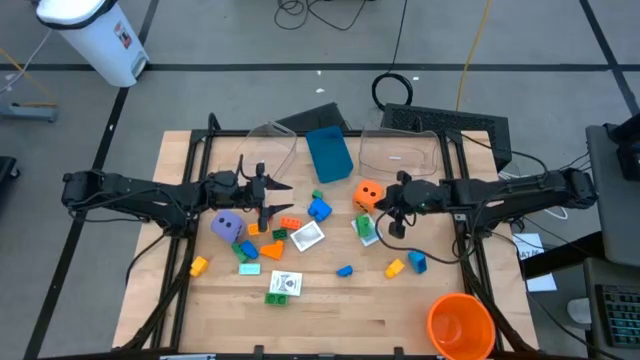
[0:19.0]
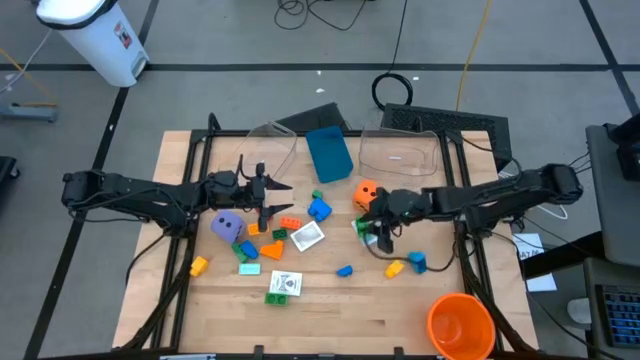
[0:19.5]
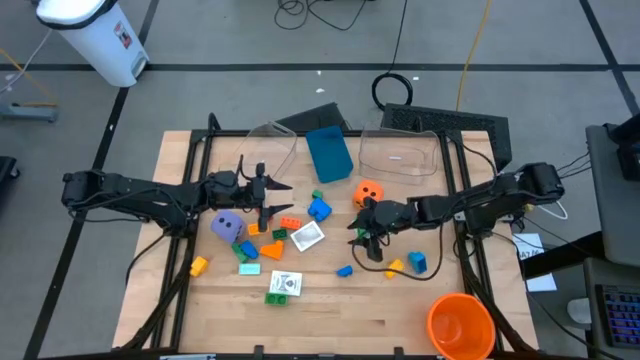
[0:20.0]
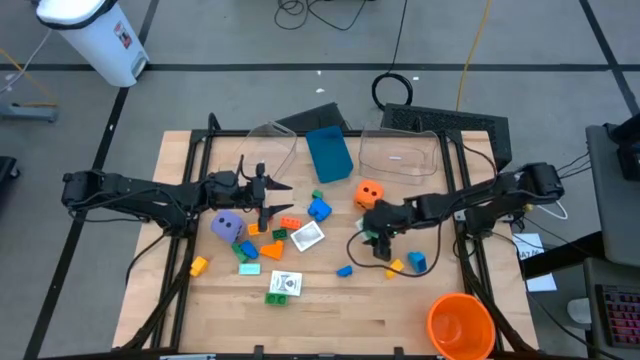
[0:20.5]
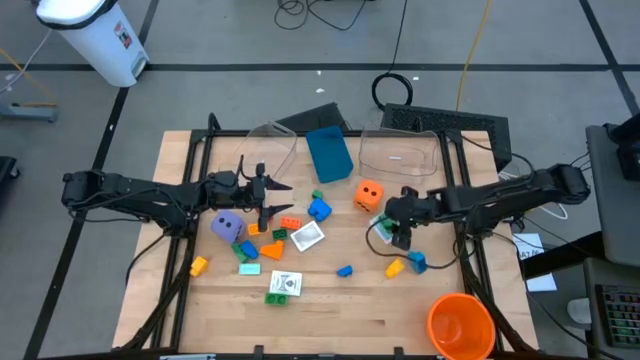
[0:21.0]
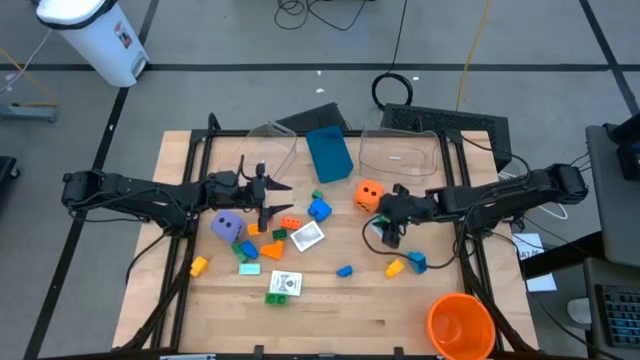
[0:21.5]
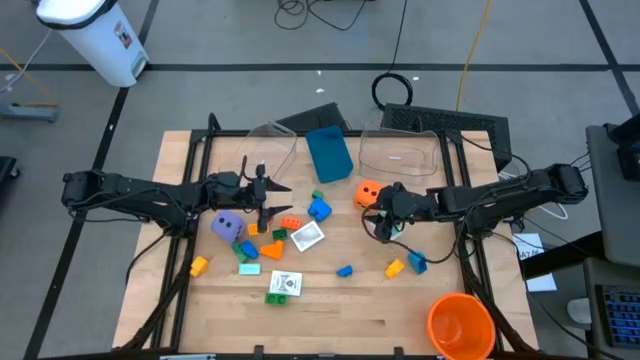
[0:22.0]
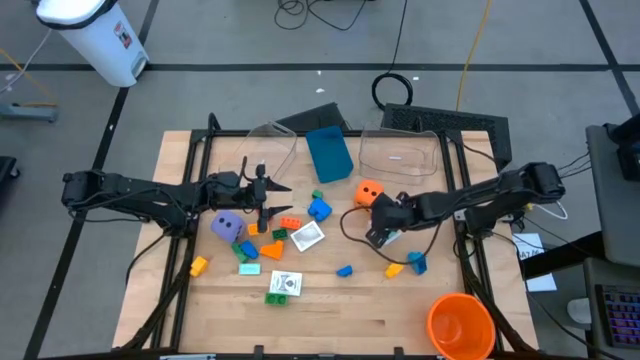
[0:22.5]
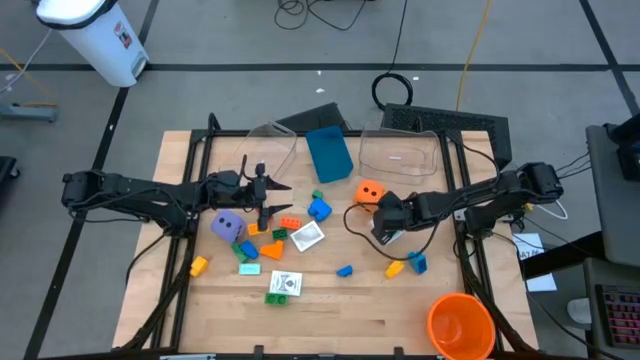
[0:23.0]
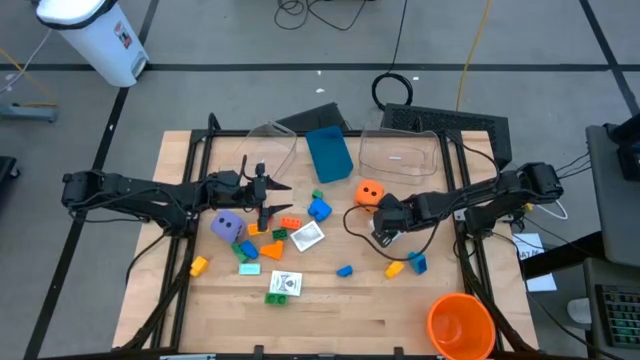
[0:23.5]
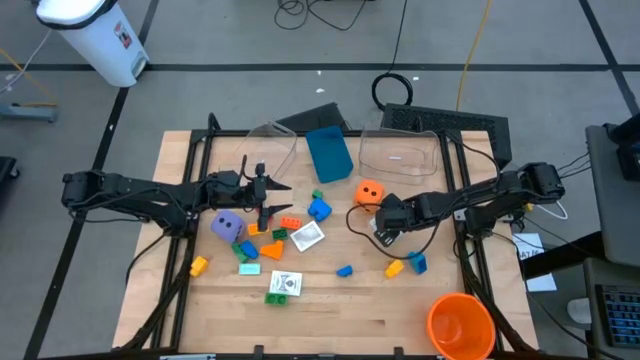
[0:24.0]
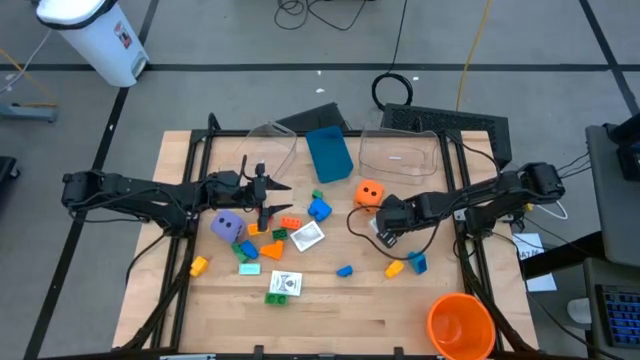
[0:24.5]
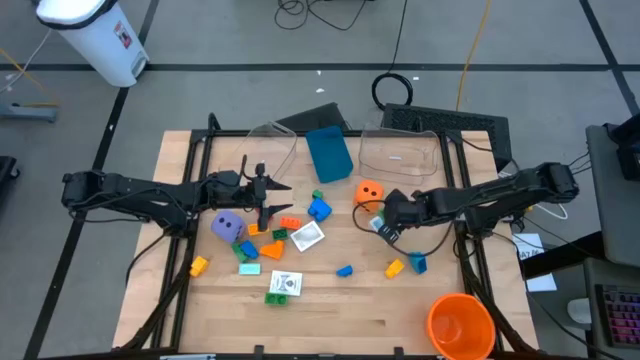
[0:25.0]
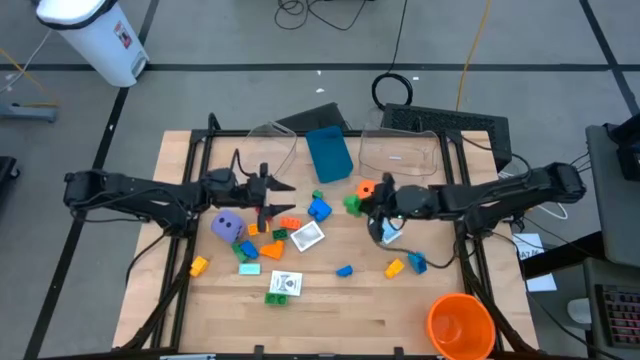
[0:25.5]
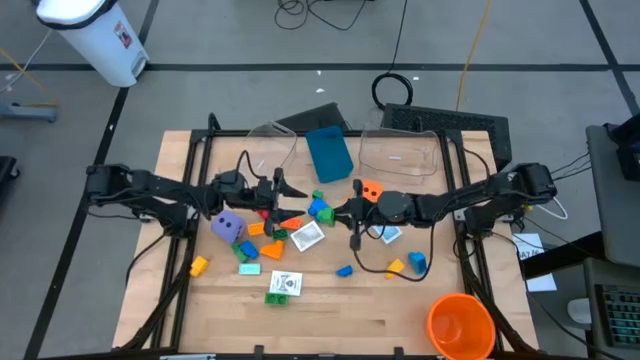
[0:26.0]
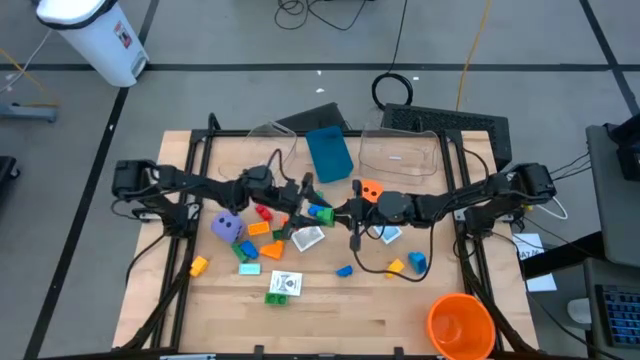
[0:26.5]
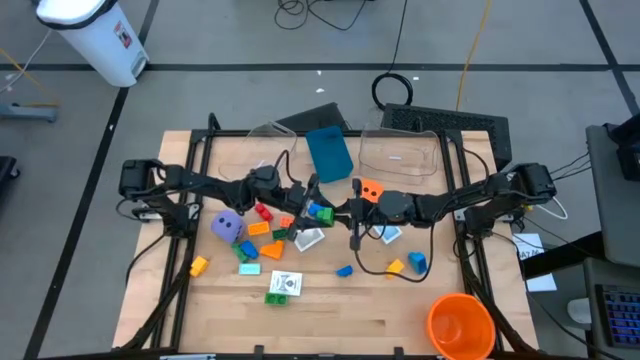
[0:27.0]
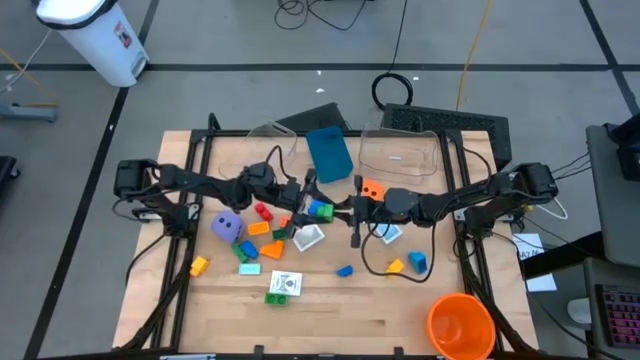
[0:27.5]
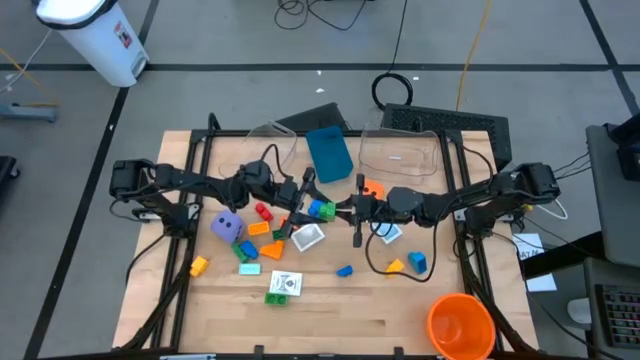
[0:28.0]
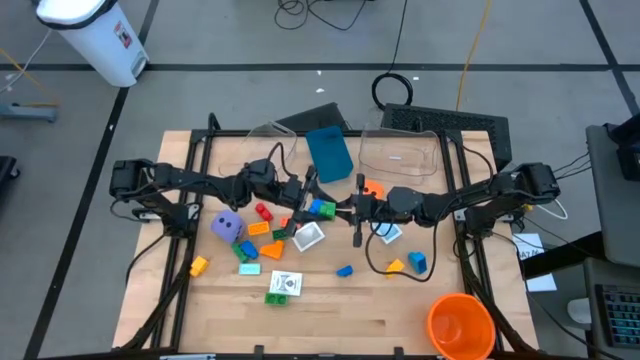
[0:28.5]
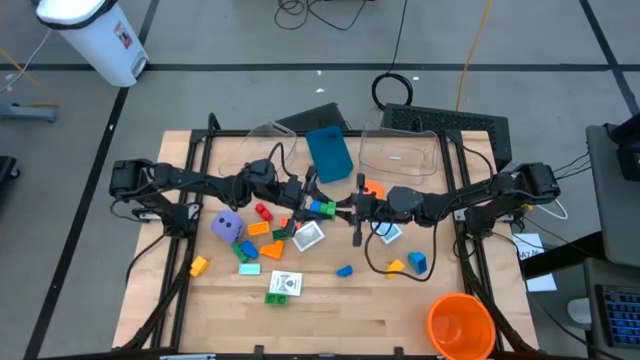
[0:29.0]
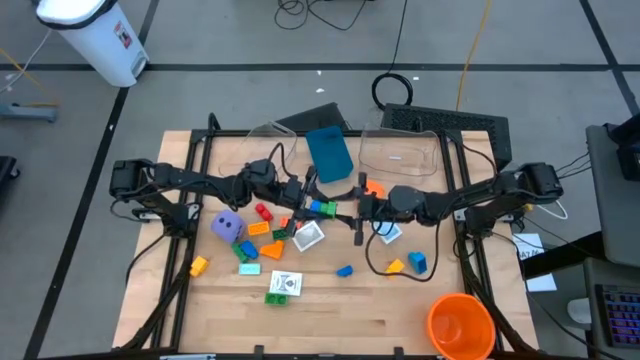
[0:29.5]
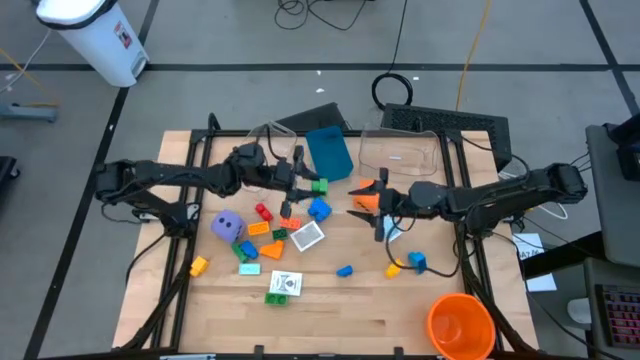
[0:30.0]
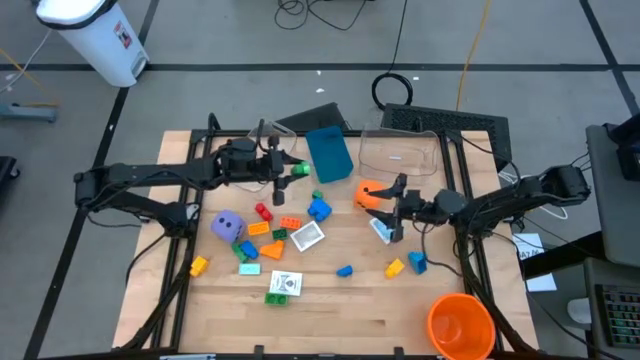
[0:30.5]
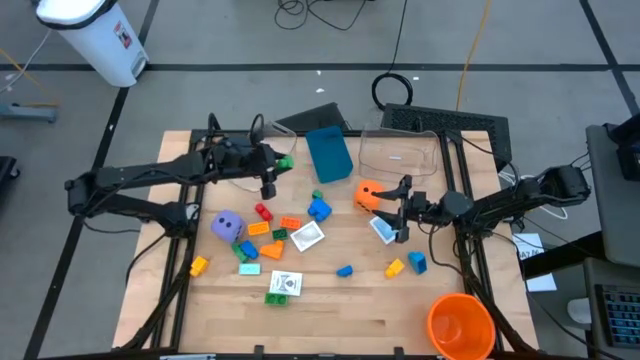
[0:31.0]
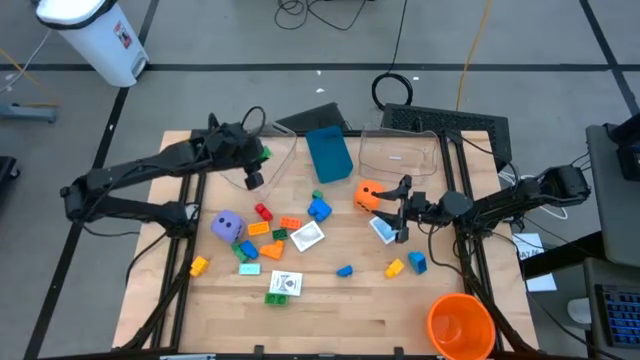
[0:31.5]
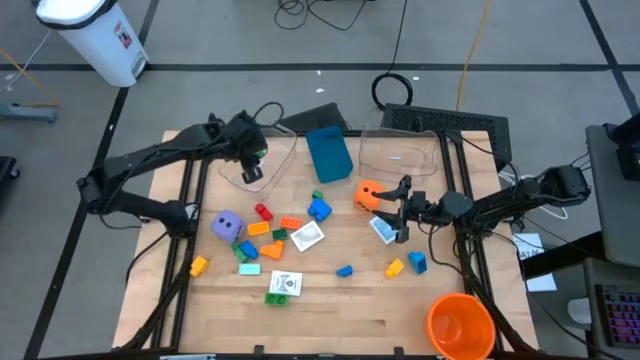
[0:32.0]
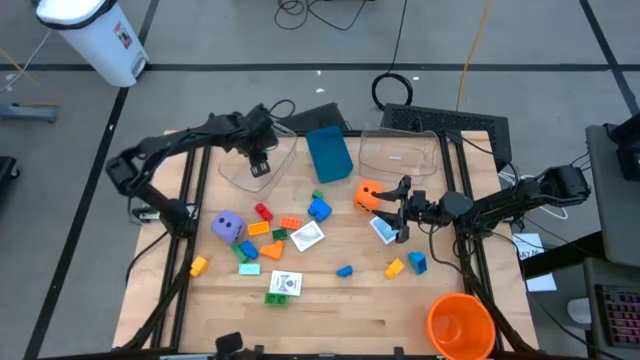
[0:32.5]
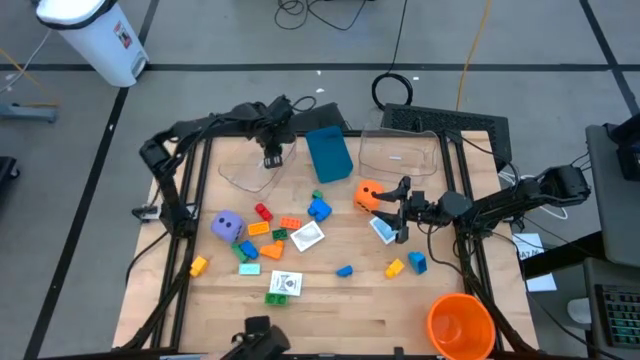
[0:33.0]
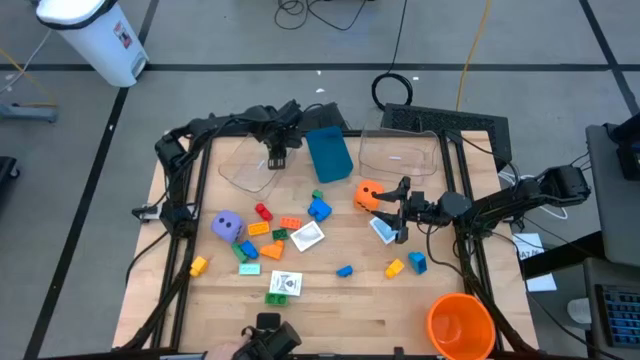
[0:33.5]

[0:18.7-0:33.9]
Task: Pick & Place Toys
Put the green game piece into the left transparent bin

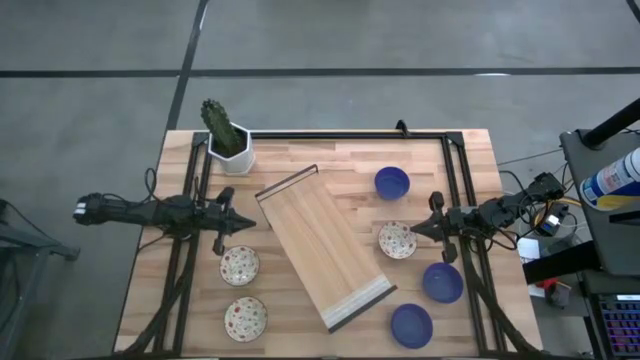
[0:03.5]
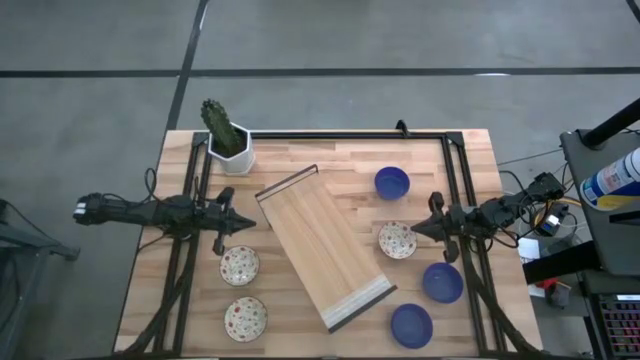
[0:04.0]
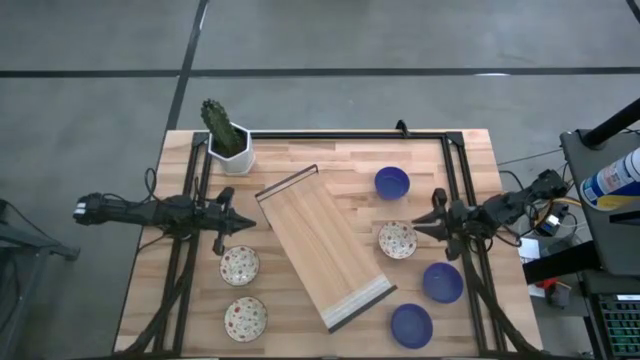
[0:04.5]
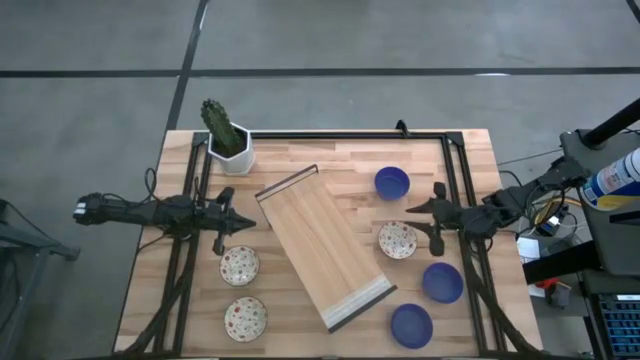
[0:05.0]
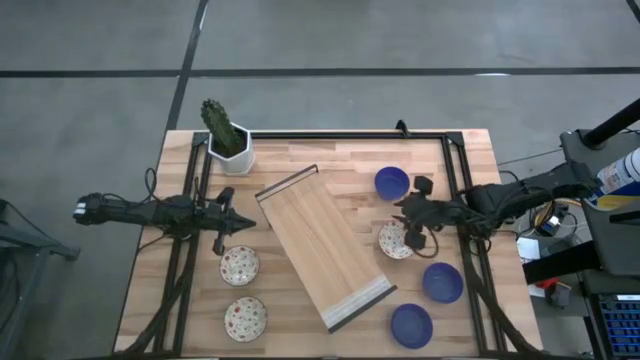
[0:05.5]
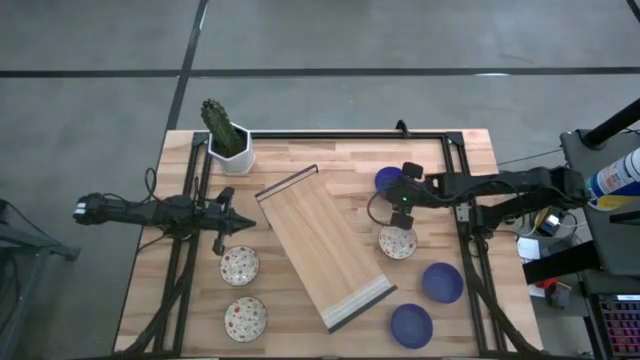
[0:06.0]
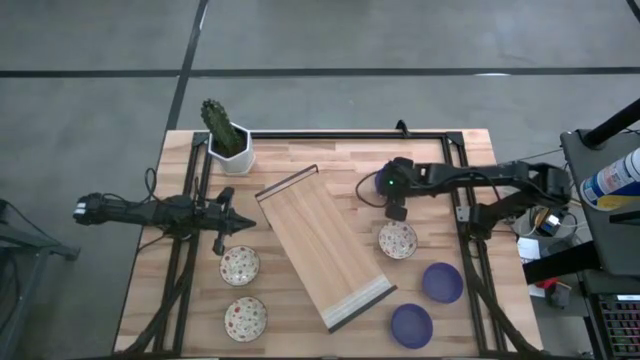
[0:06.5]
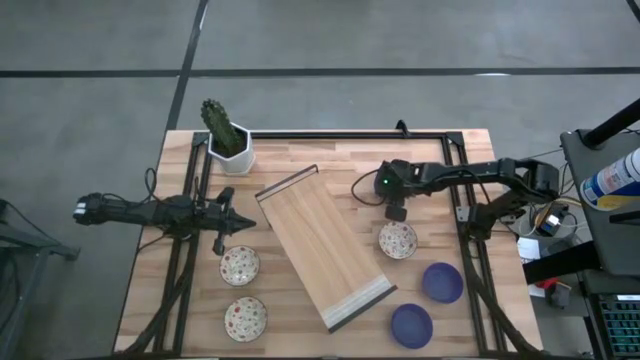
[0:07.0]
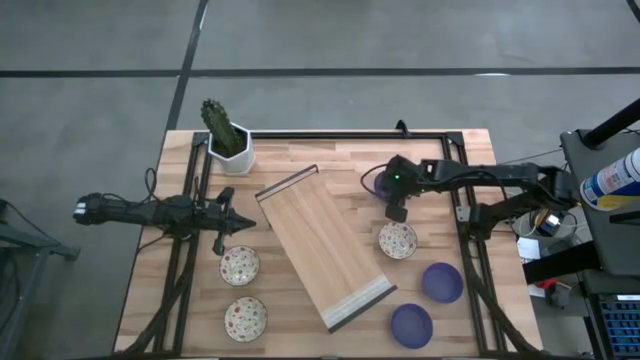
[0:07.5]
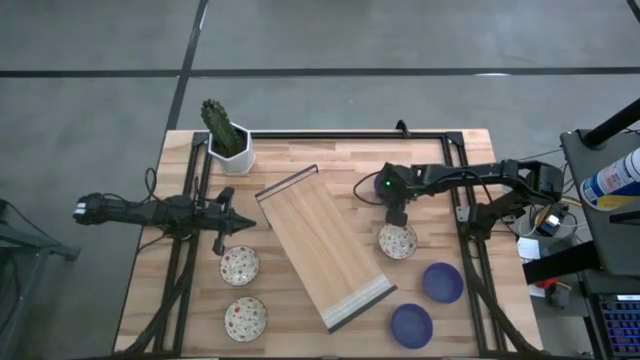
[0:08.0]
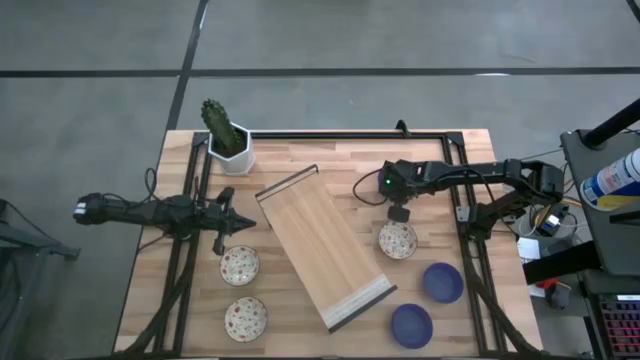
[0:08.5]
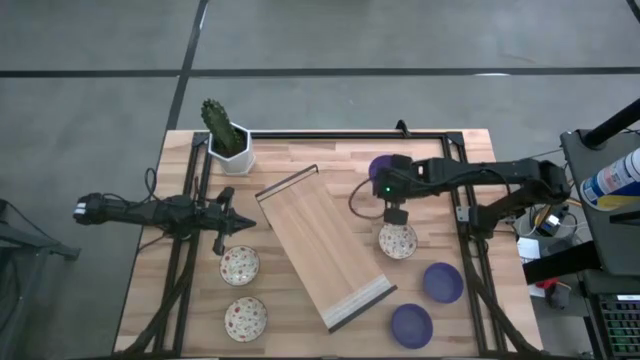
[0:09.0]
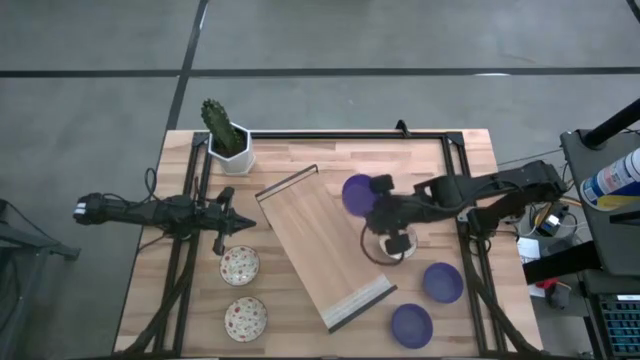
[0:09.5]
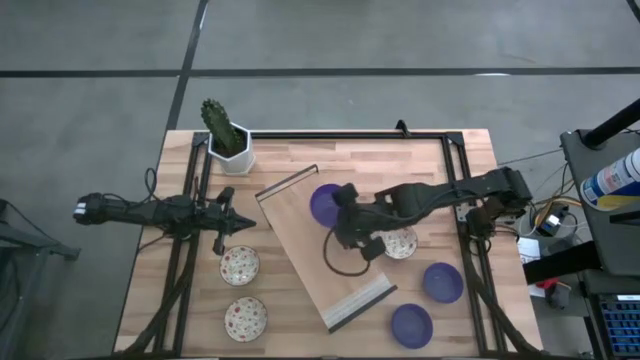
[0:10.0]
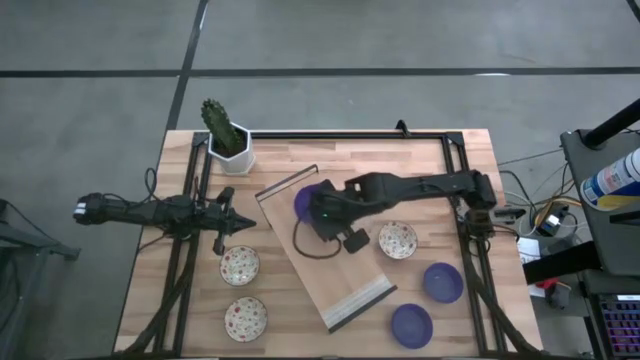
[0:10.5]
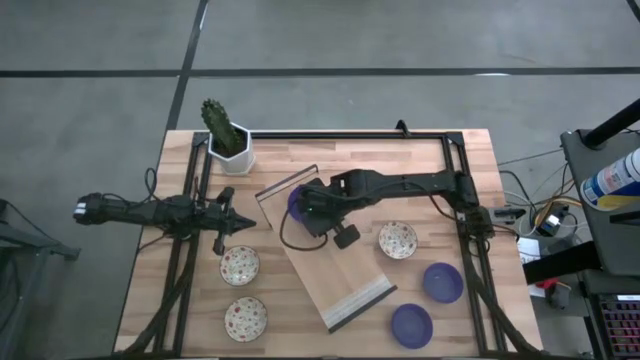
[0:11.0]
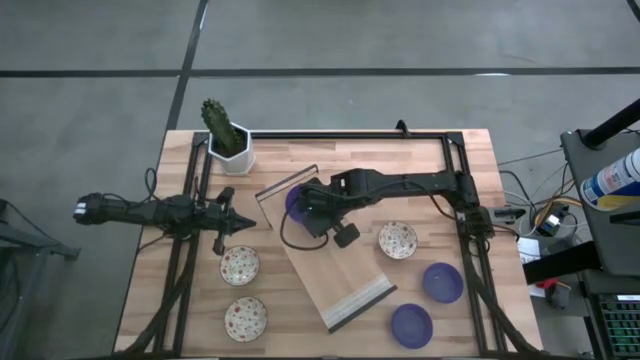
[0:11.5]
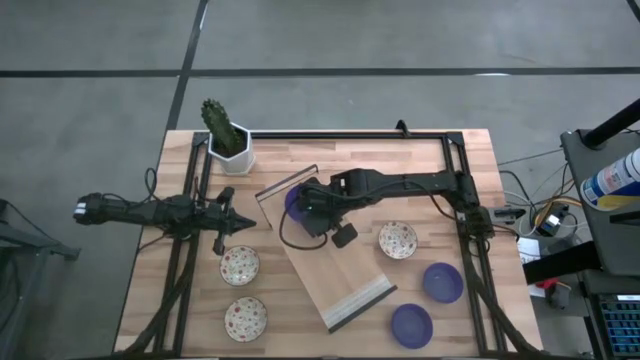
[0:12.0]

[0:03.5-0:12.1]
Task: Pick & Place Mini bowls
Put the top blue bowl on the shelf
